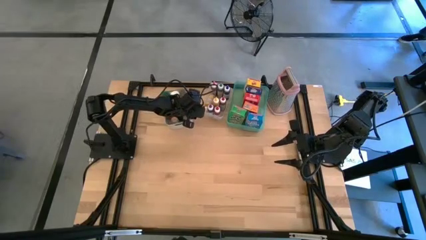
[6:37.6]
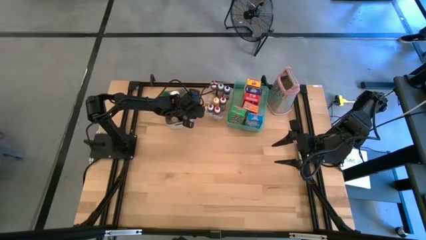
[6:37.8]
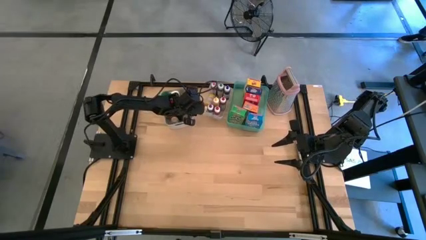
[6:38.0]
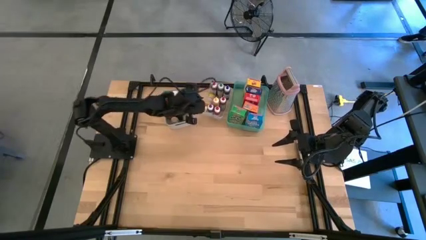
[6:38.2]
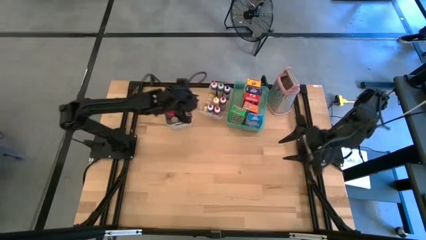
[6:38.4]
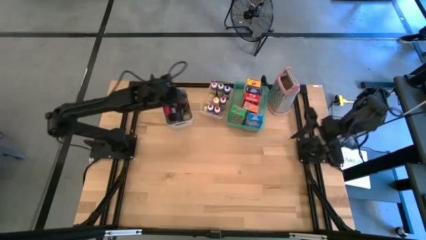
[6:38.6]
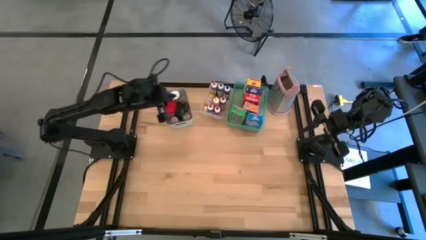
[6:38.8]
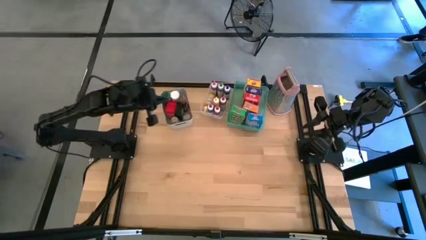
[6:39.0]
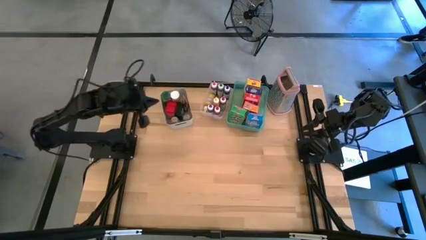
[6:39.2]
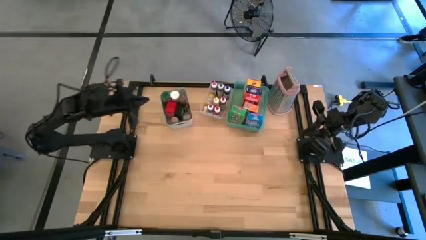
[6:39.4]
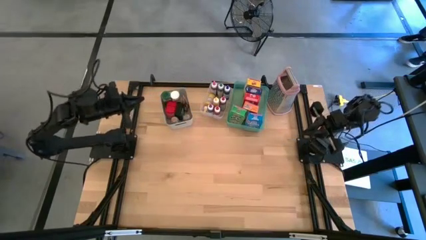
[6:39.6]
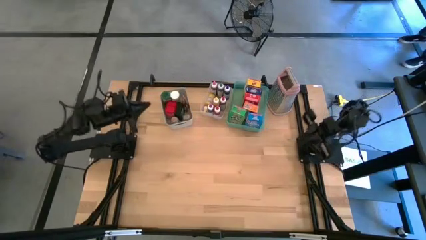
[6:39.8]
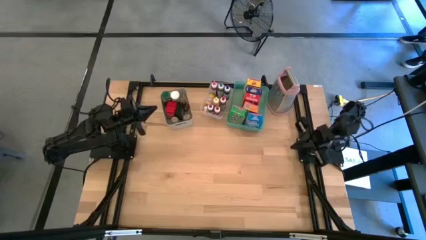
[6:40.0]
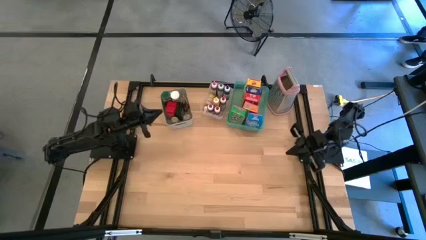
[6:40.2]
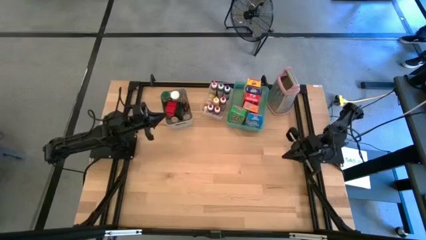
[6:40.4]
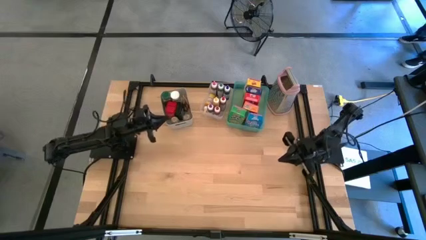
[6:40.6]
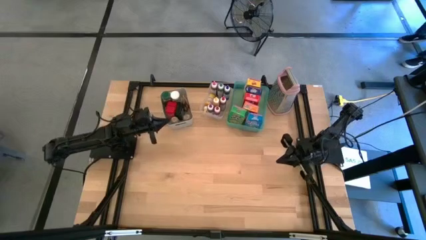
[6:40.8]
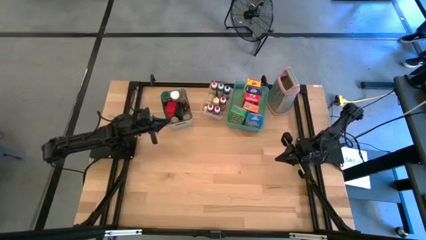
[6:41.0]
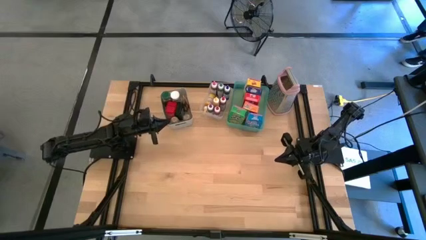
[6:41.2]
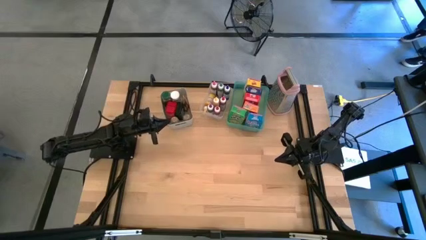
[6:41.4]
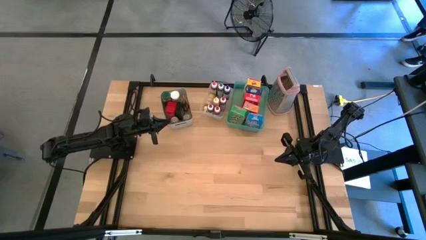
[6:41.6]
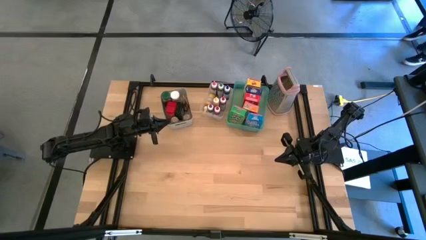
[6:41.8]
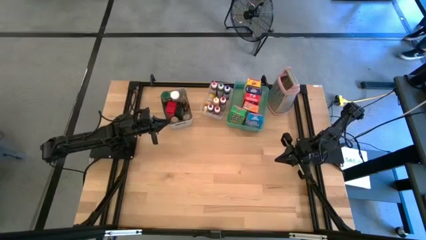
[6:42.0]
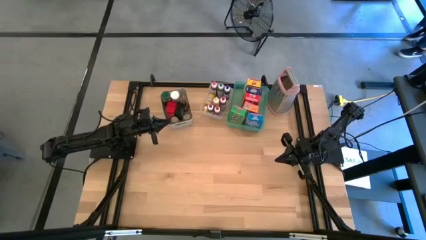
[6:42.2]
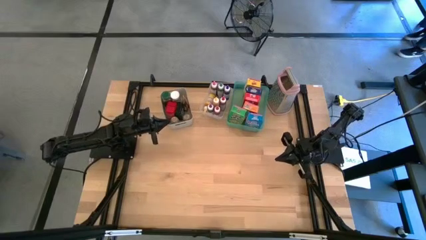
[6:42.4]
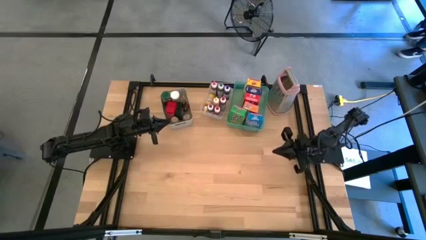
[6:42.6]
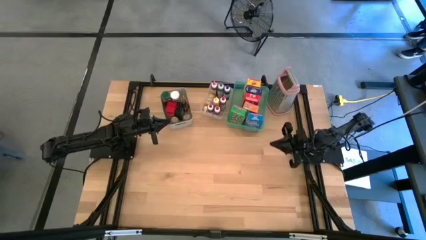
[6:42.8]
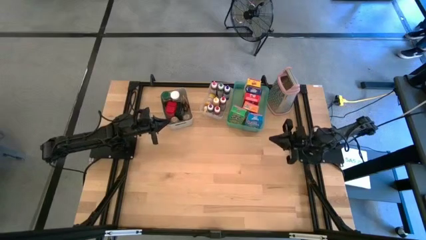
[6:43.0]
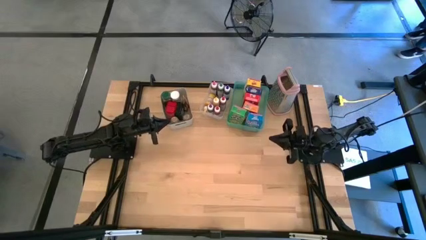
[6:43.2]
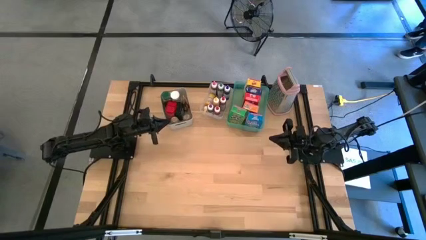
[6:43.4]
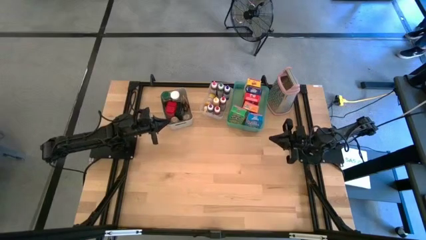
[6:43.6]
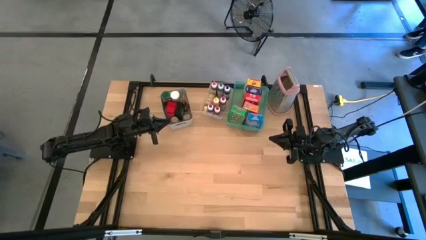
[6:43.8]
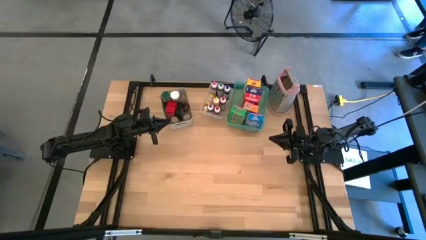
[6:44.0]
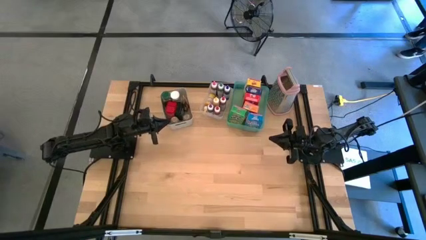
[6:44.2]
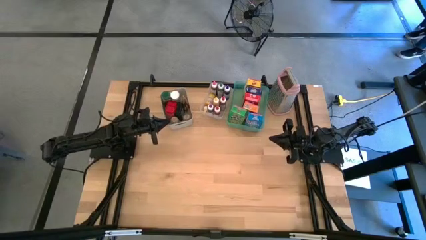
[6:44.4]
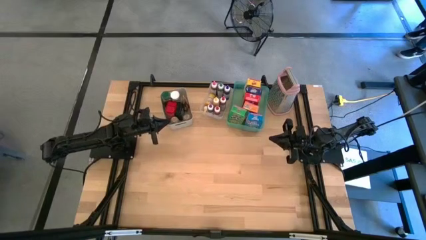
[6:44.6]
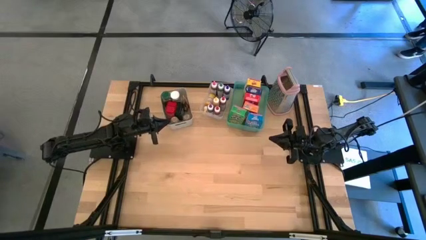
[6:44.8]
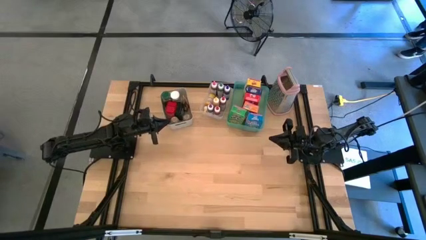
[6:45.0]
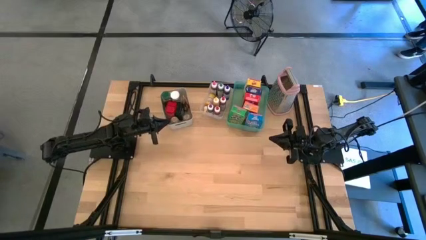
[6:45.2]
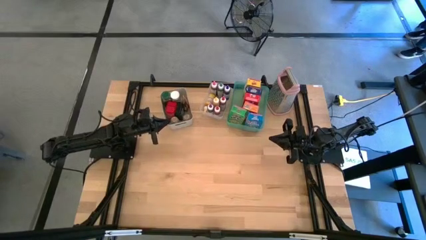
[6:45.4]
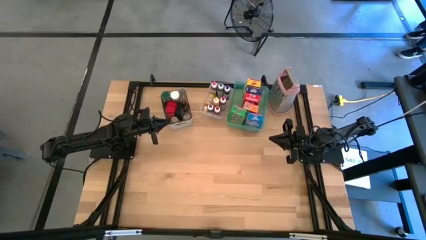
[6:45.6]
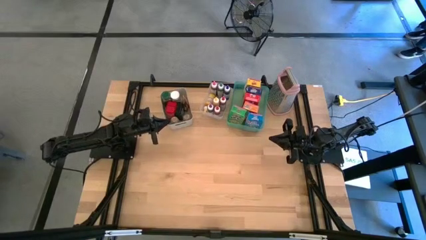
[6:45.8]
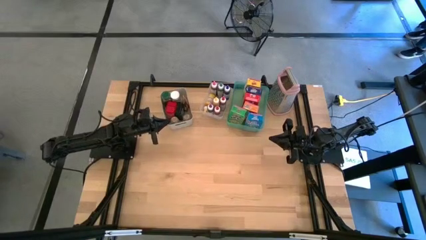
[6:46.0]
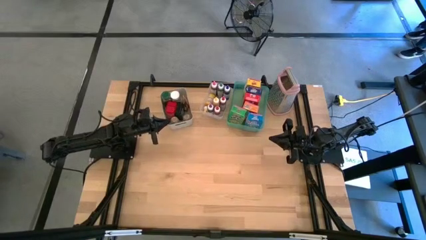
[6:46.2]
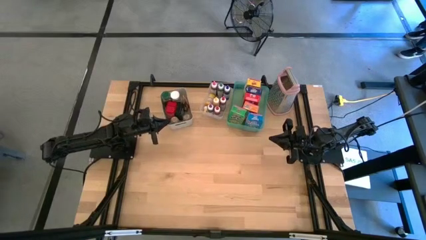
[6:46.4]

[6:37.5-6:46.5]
Task: Pick & Place Kitchen Items
Return to Home Position

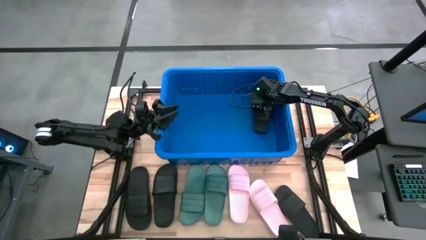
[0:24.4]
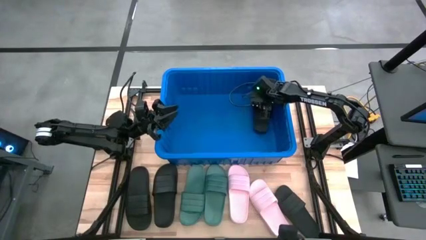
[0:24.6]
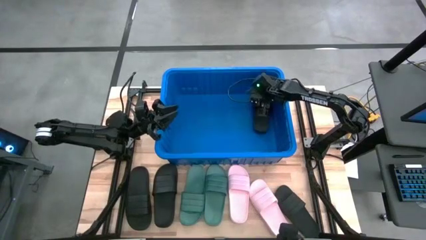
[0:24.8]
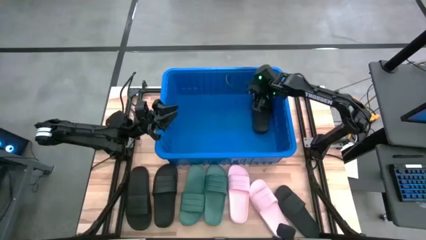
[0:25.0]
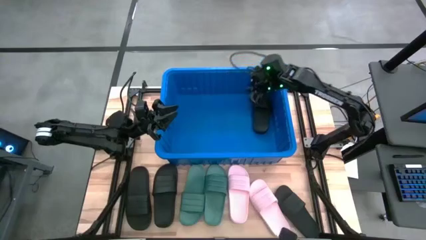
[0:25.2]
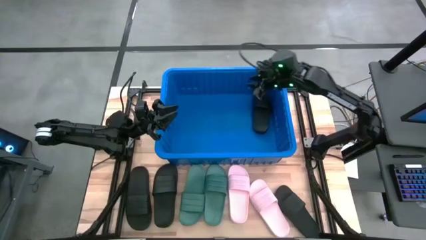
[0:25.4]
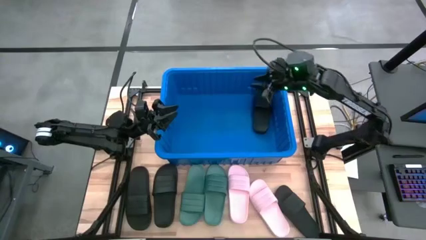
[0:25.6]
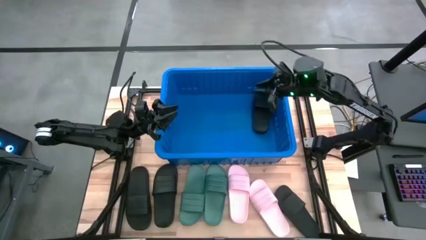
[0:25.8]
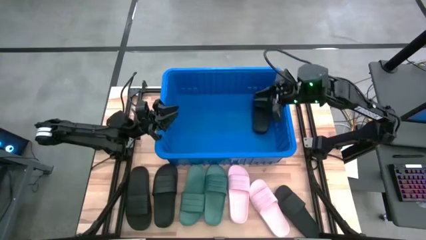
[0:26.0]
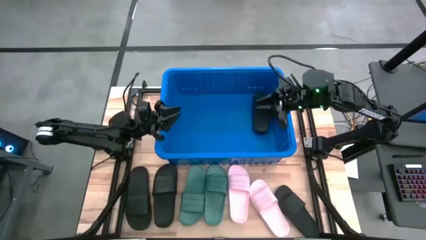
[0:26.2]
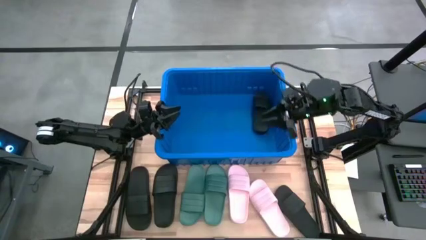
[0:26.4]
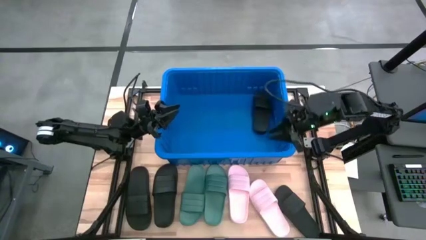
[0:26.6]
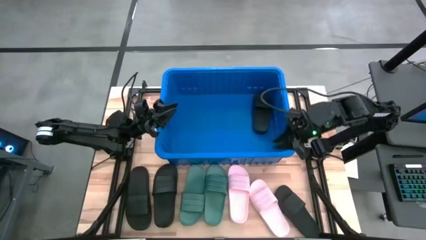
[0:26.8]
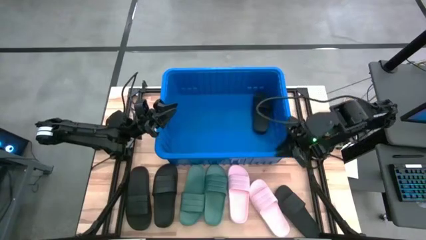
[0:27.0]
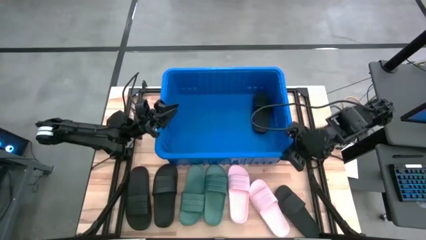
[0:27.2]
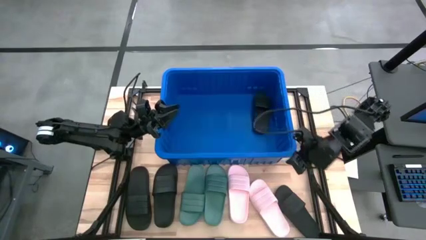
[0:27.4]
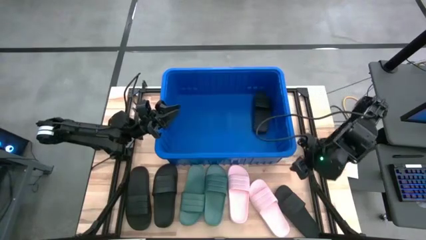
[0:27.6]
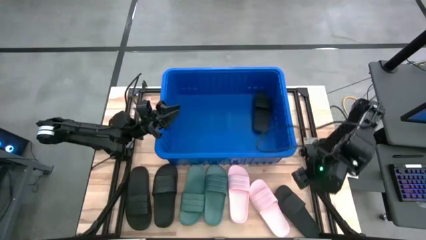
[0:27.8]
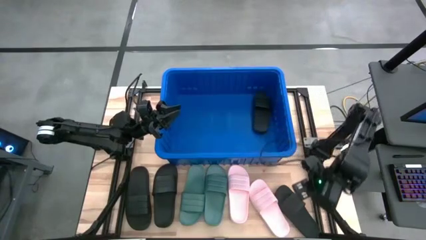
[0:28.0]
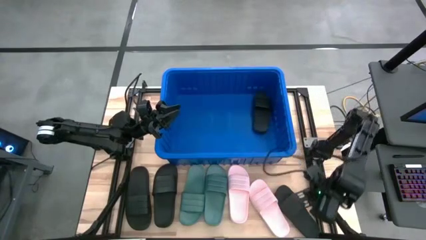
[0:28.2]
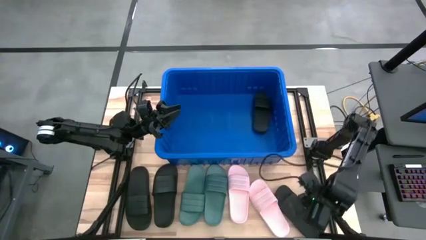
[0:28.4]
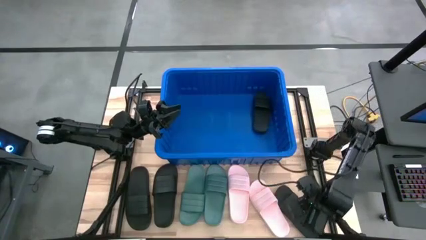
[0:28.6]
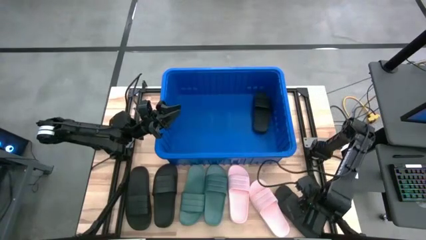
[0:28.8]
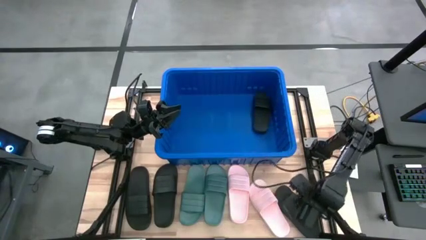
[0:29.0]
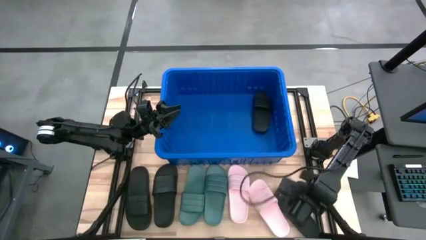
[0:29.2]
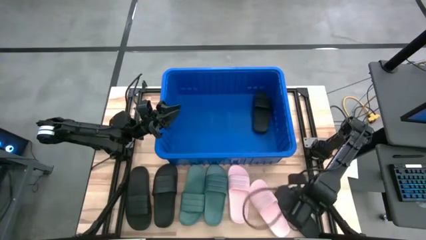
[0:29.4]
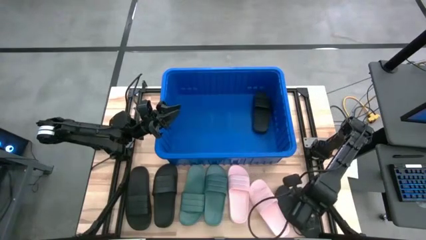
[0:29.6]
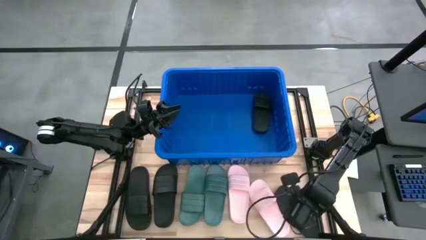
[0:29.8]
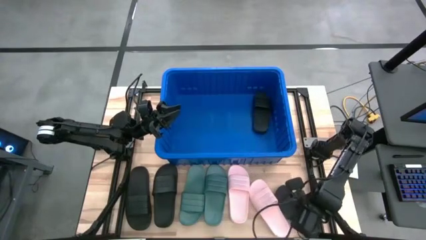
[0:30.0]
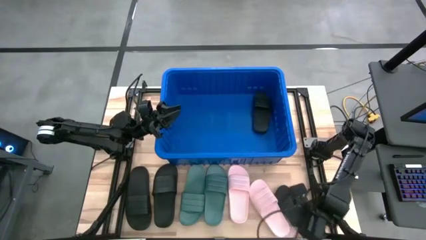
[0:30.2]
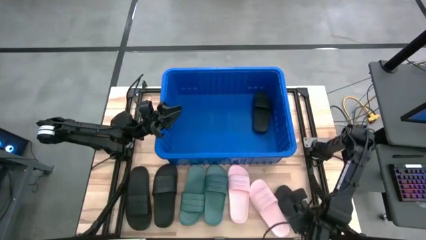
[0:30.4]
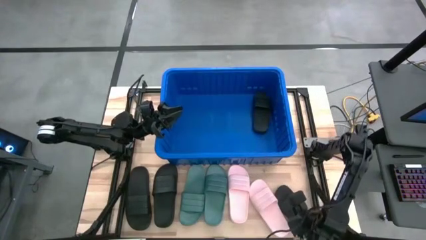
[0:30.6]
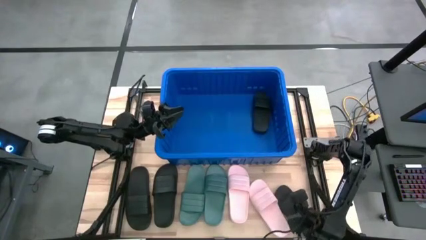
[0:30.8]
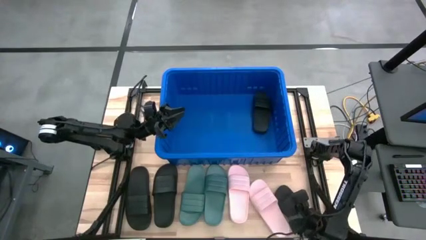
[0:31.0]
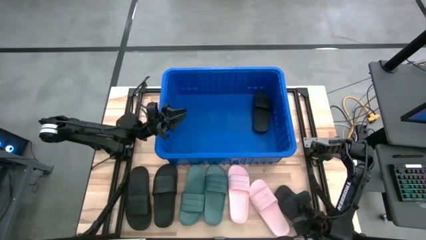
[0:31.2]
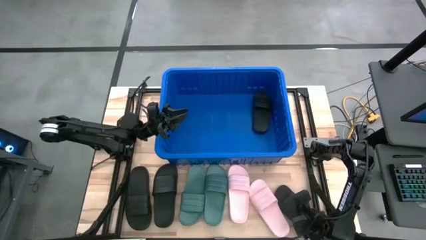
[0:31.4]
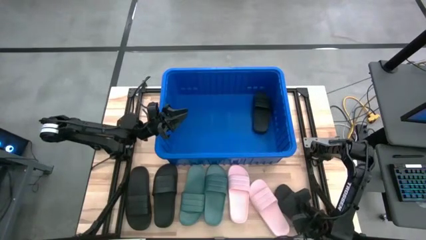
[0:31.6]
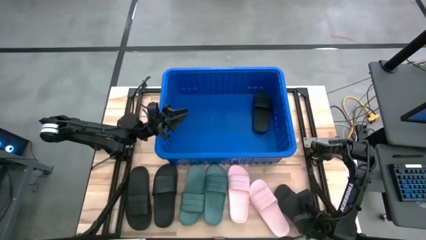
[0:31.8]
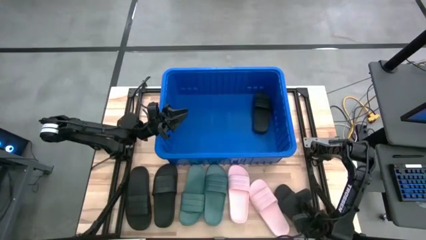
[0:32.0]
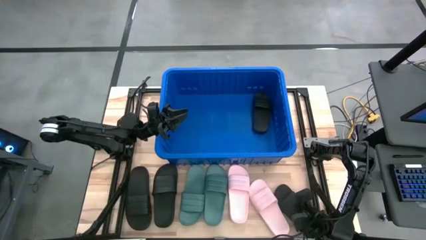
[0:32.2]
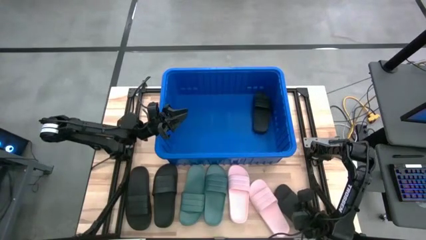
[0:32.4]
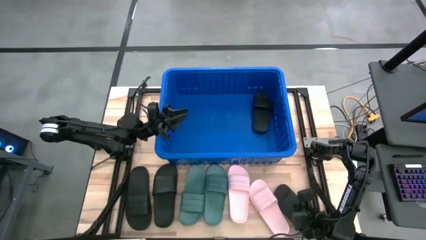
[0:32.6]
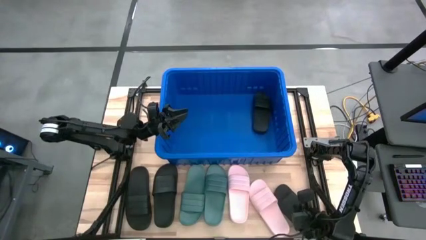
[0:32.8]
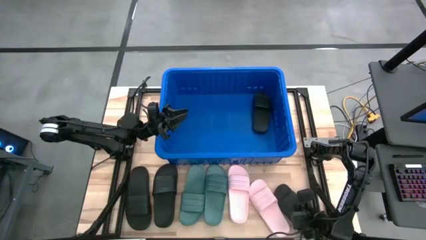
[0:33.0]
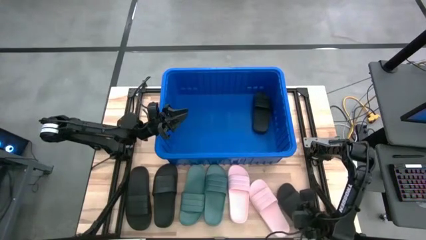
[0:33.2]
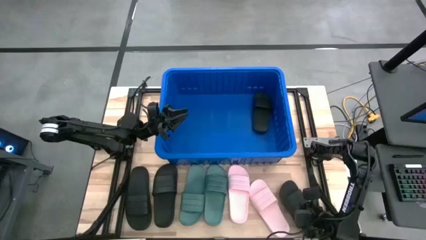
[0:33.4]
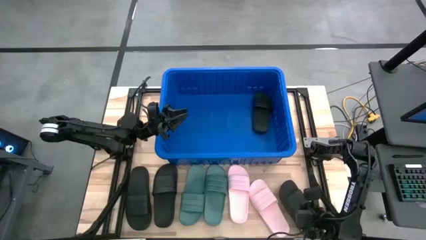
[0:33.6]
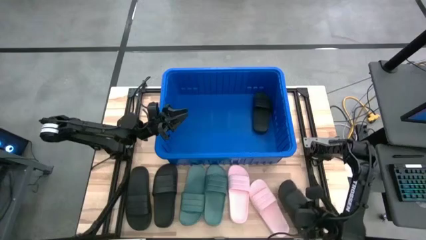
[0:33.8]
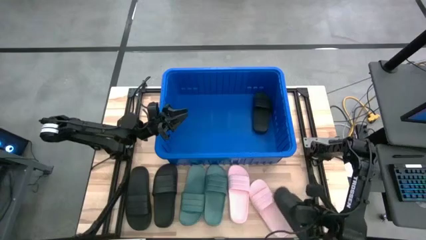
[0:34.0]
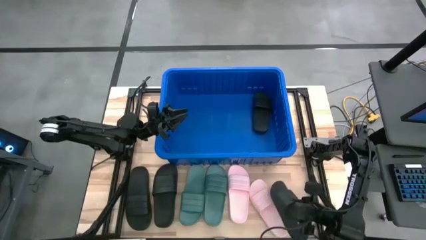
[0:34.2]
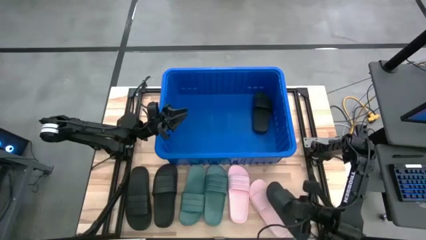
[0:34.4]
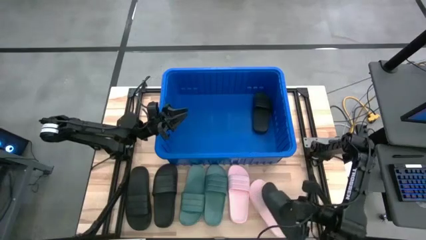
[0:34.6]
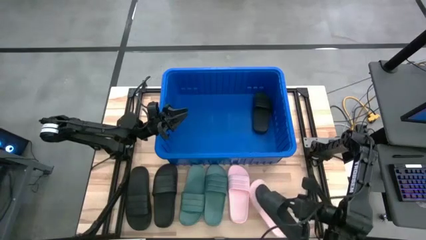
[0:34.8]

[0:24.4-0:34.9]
Task: Pick and place slides into bin
Put the black slipper into the blue bin
